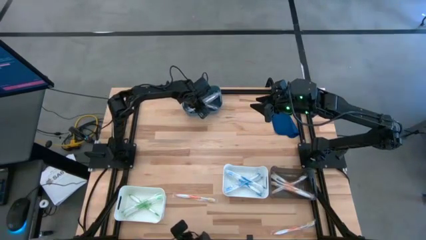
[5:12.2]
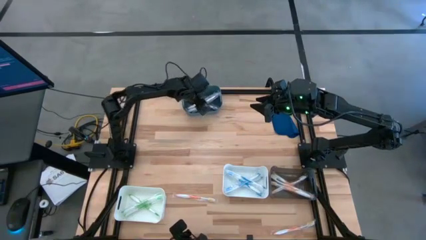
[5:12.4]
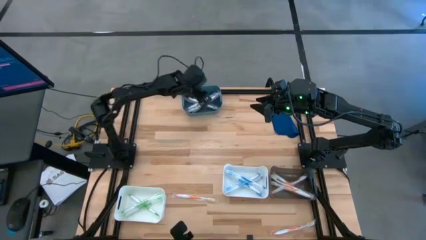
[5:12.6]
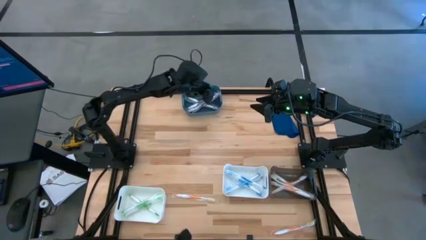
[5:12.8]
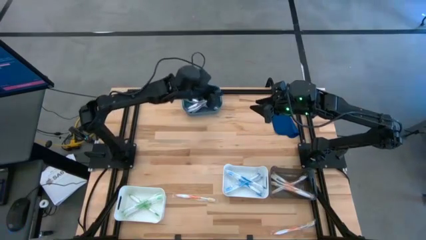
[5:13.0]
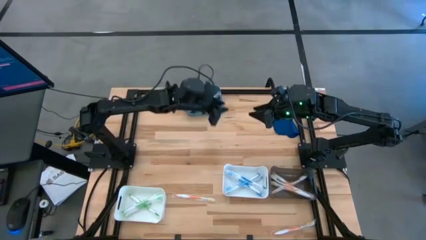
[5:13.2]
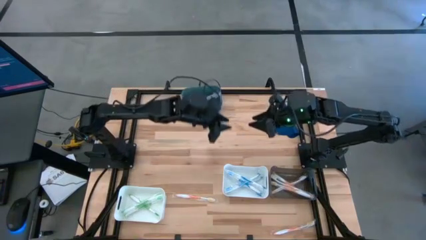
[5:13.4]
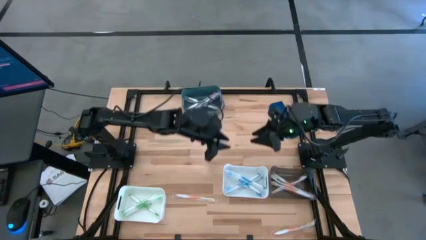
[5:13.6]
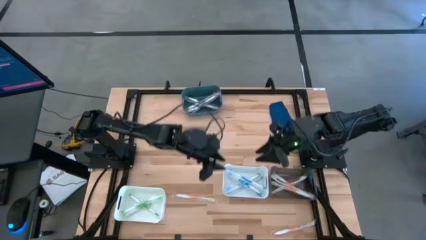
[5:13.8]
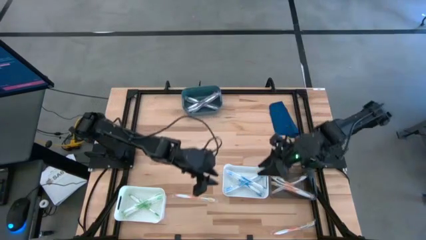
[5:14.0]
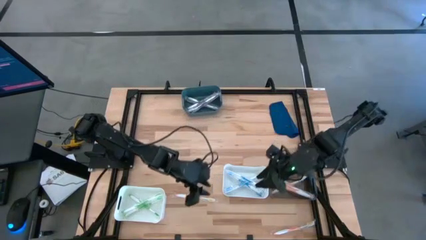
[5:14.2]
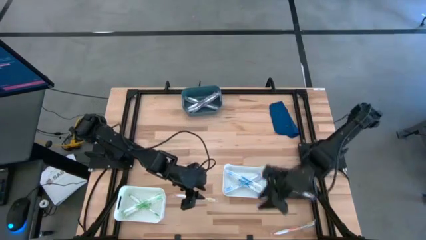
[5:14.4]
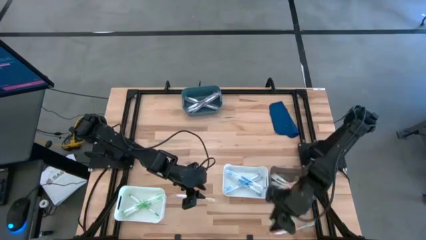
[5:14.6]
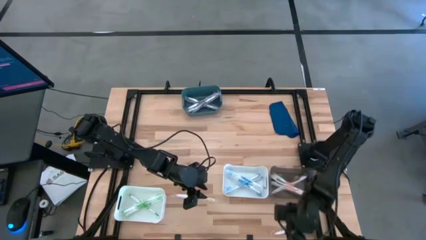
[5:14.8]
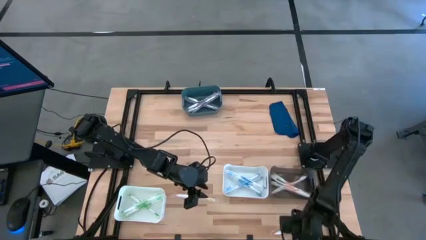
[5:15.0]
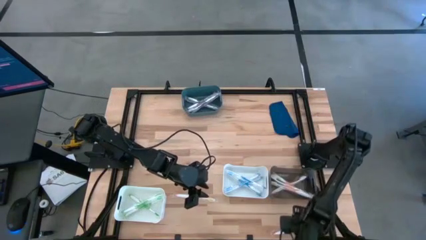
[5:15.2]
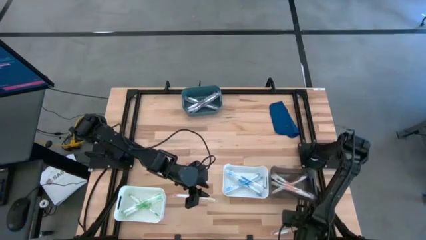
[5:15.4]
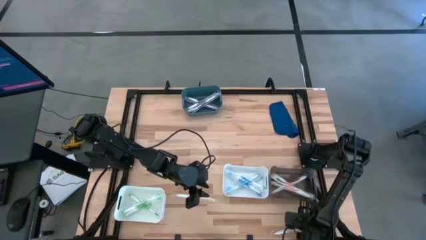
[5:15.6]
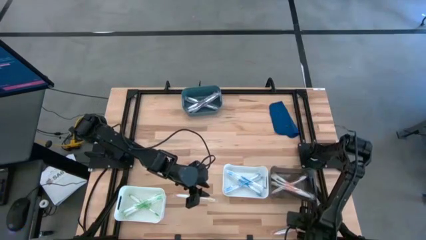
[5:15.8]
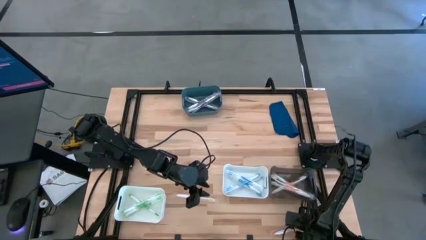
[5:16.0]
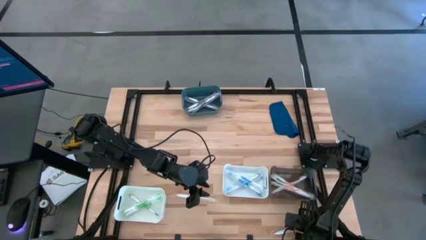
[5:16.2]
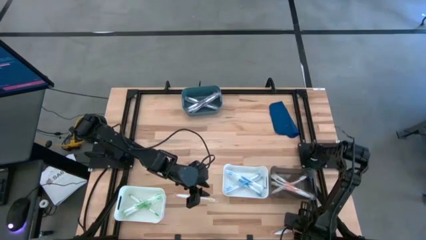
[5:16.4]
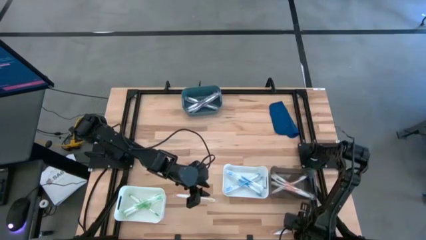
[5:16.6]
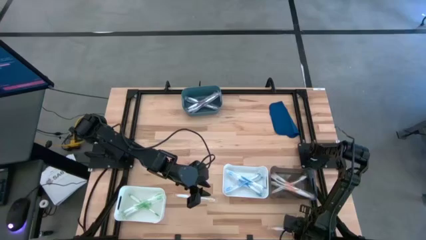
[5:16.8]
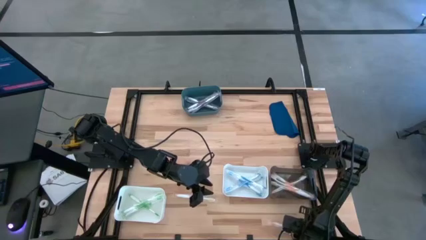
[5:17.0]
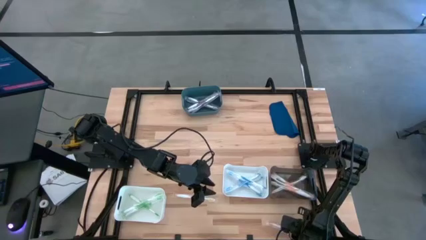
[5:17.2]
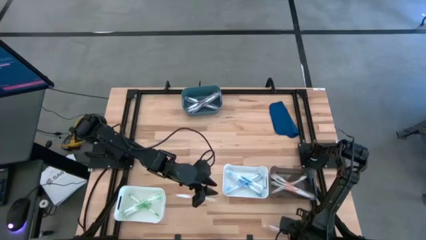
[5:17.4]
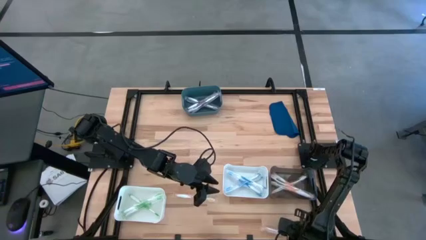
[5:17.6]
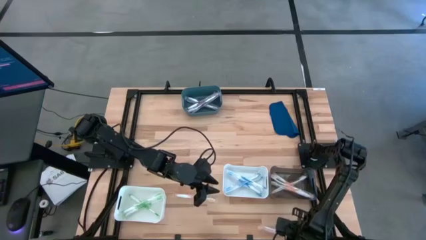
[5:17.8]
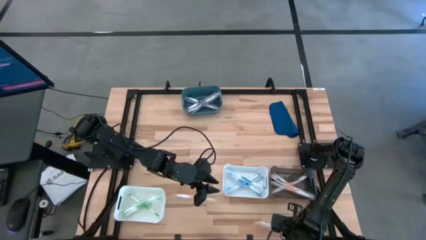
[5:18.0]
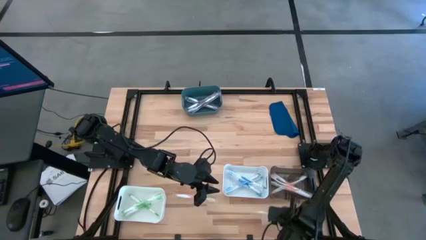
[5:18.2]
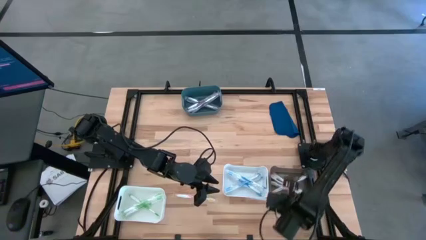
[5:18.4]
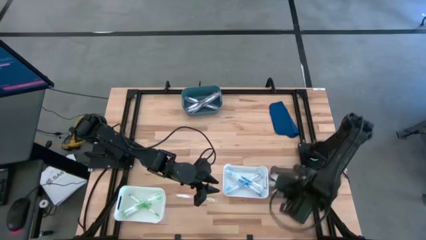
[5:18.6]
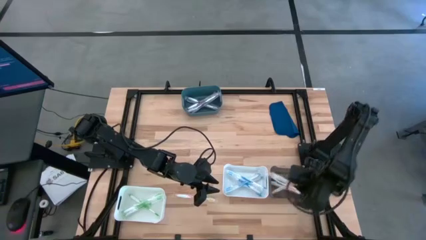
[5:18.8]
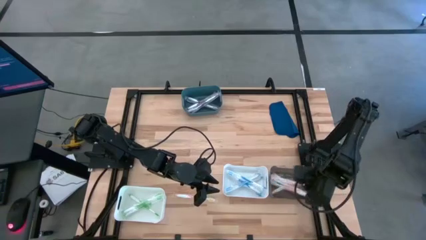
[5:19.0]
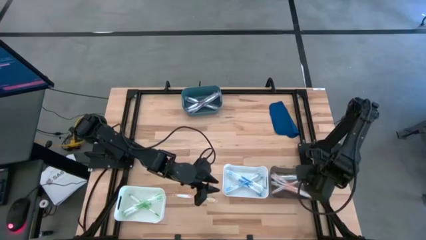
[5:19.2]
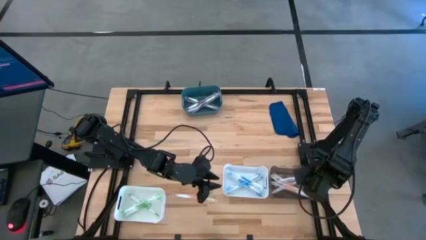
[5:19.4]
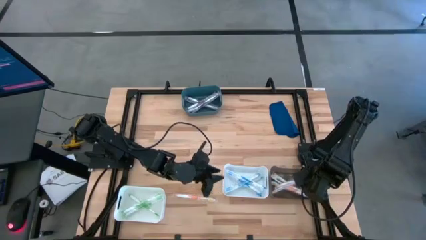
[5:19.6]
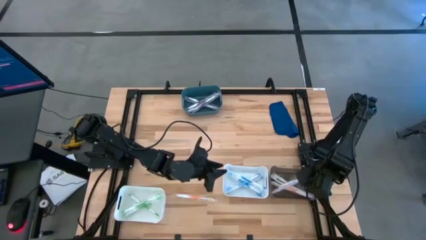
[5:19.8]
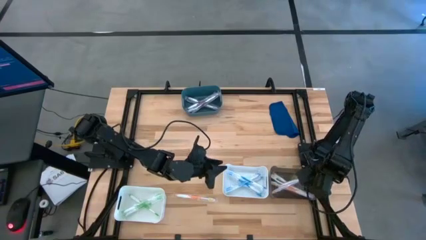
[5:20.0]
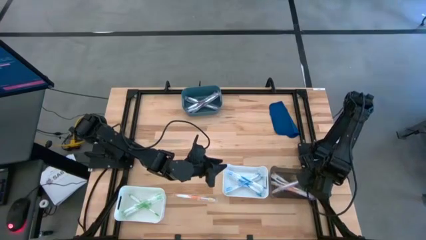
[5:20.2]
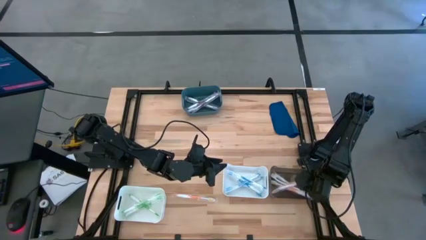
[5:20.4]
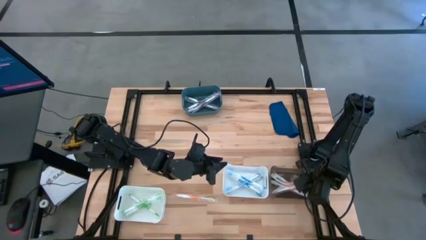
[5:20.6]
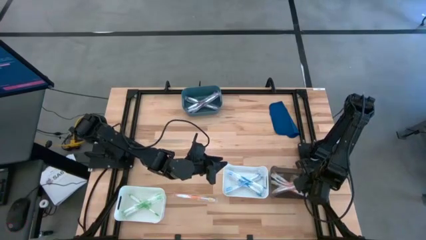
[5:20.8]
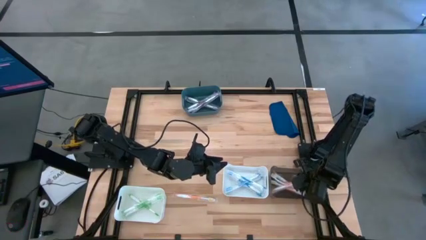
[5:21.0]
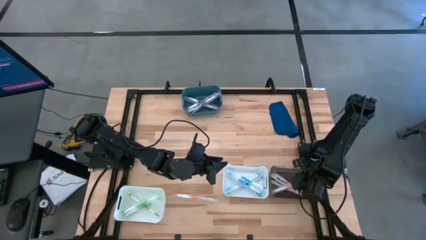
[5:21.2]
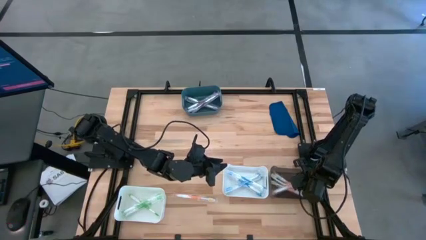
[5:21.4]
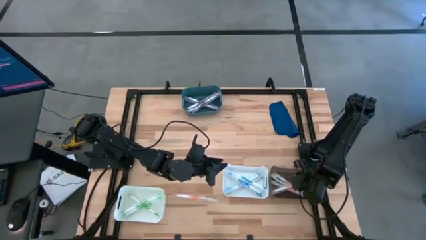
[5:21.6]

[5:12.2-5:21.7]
Task: Pick & Place Toothbrushes
Put the orange toothbrush into the black bin

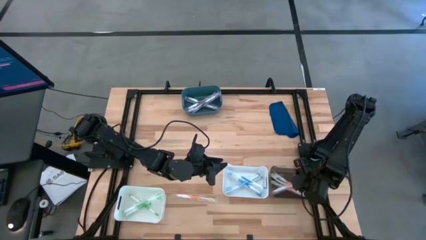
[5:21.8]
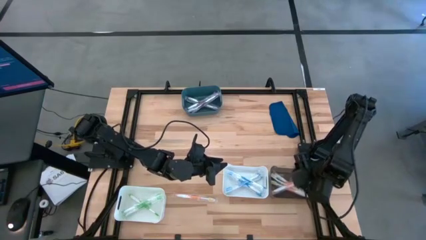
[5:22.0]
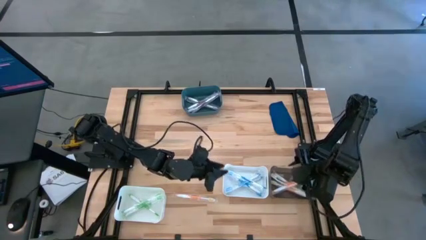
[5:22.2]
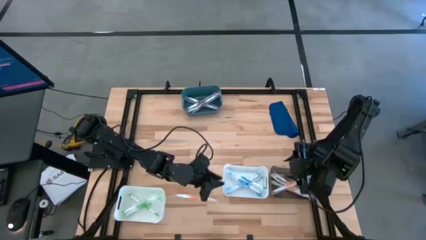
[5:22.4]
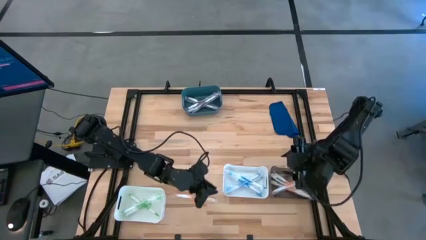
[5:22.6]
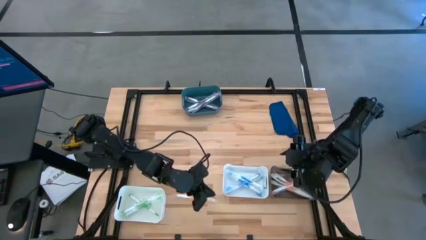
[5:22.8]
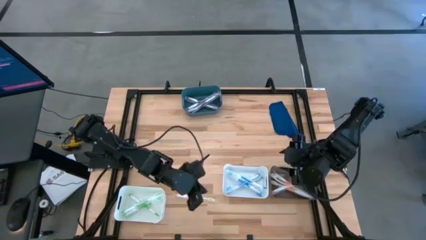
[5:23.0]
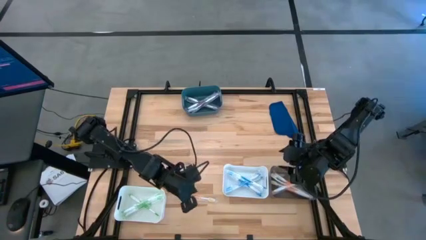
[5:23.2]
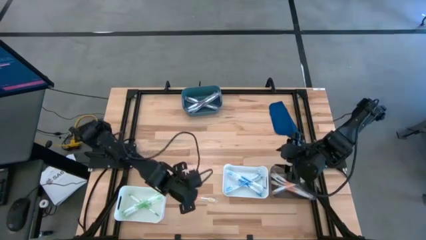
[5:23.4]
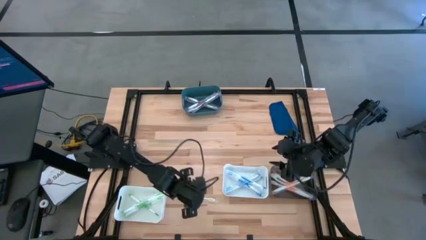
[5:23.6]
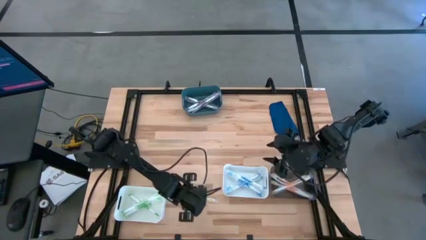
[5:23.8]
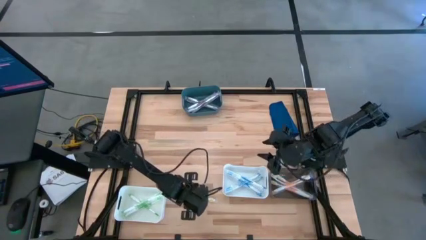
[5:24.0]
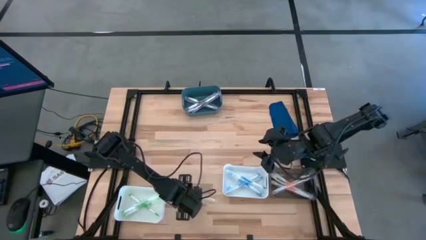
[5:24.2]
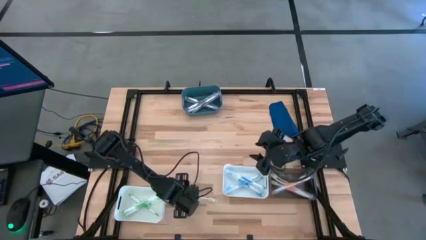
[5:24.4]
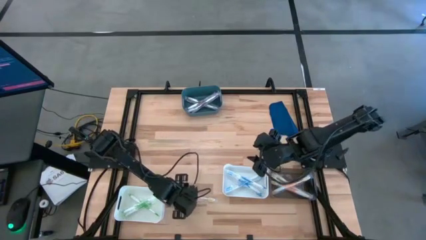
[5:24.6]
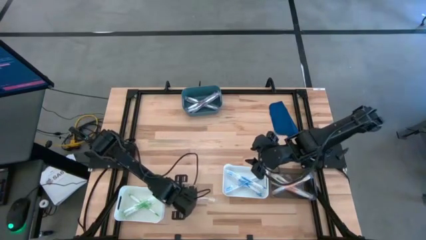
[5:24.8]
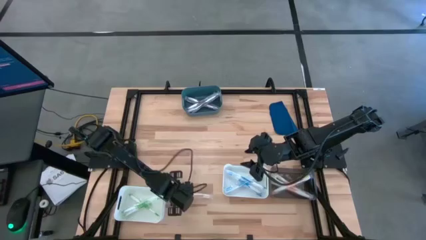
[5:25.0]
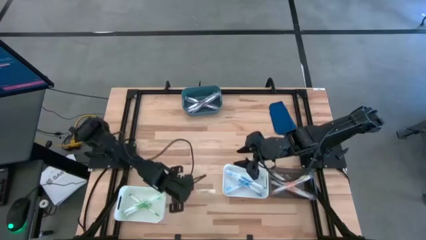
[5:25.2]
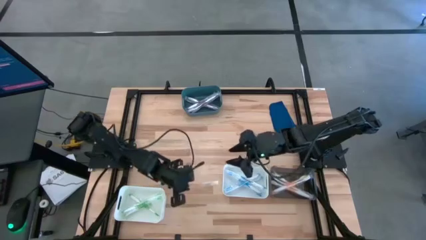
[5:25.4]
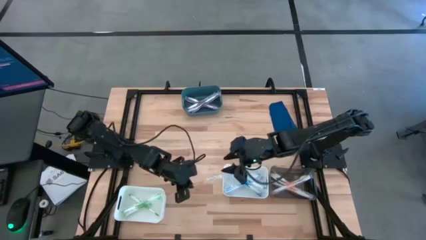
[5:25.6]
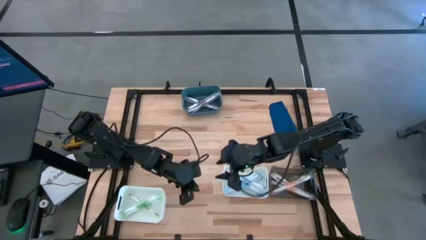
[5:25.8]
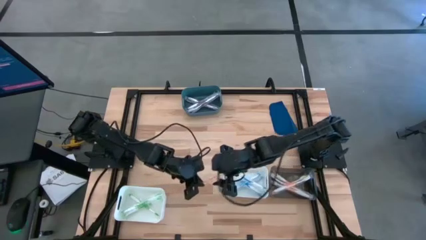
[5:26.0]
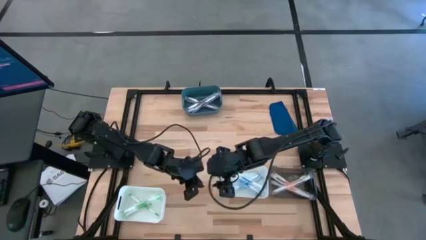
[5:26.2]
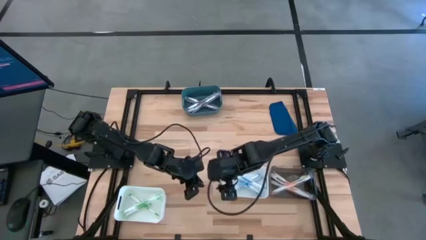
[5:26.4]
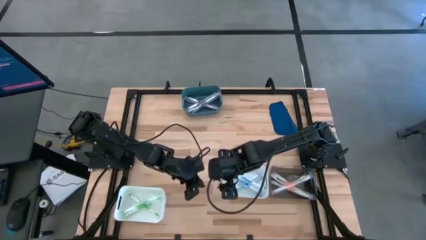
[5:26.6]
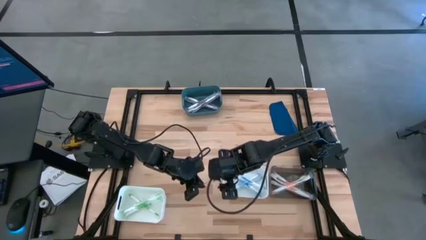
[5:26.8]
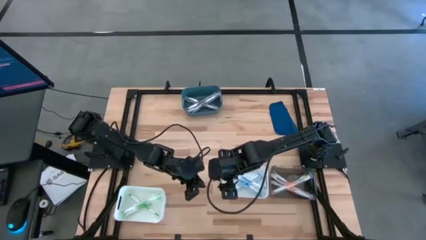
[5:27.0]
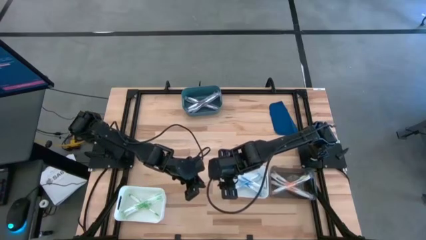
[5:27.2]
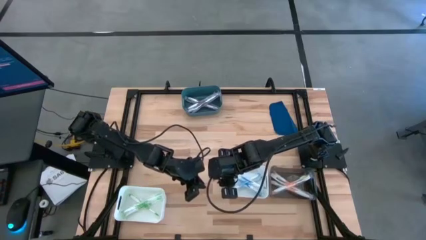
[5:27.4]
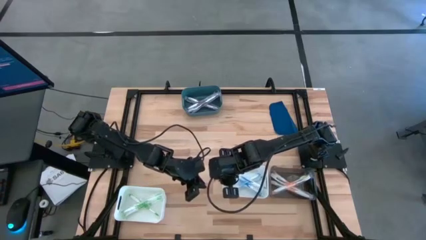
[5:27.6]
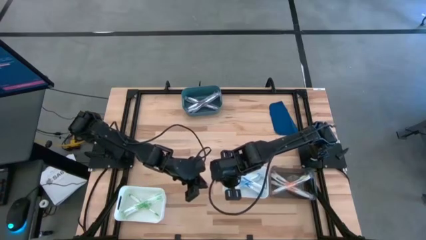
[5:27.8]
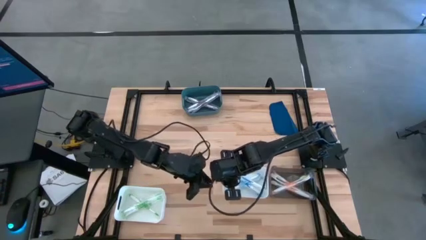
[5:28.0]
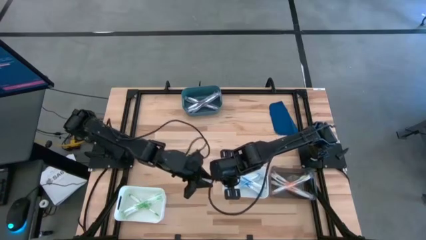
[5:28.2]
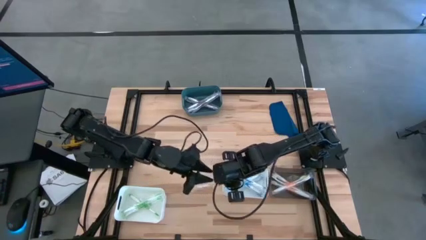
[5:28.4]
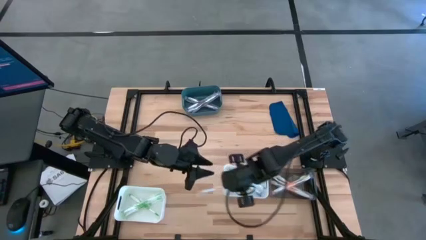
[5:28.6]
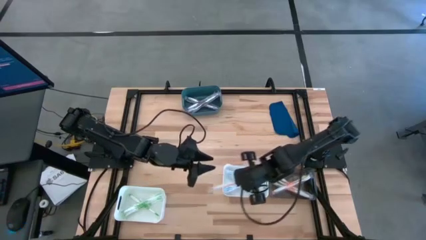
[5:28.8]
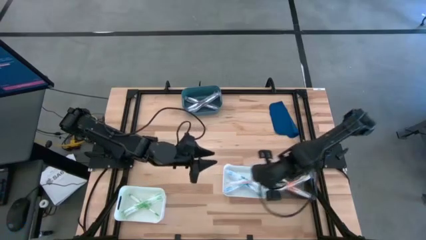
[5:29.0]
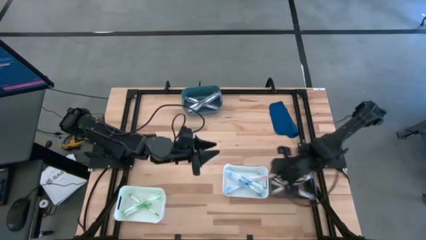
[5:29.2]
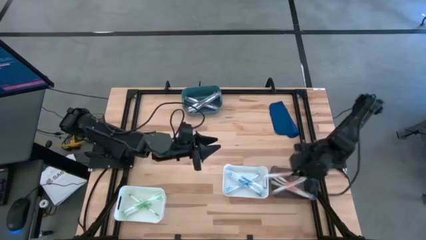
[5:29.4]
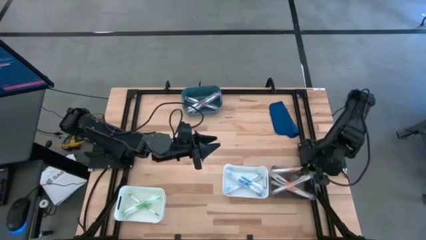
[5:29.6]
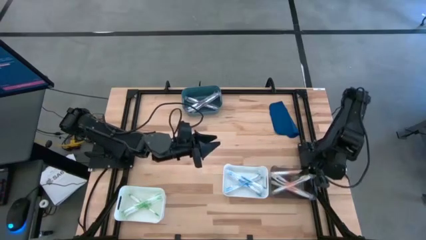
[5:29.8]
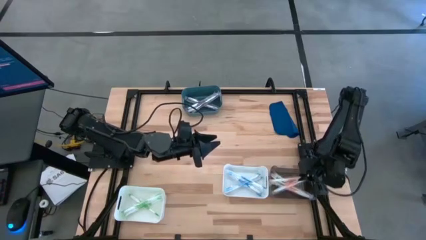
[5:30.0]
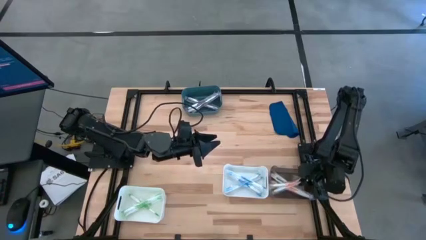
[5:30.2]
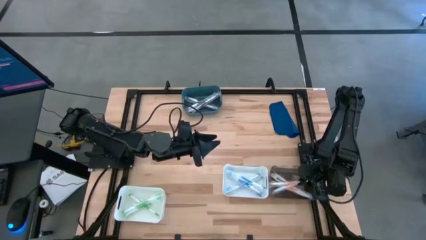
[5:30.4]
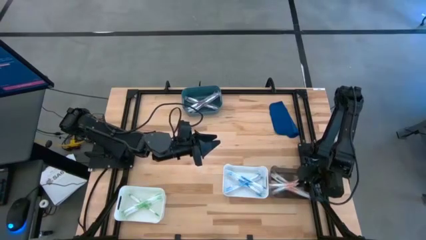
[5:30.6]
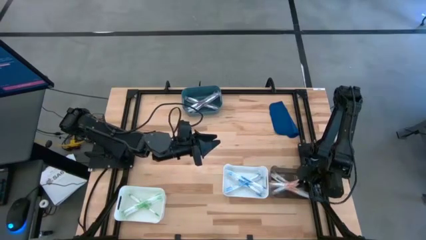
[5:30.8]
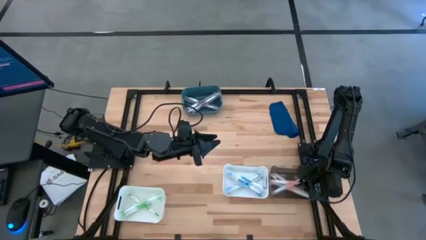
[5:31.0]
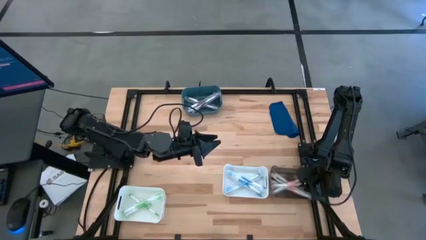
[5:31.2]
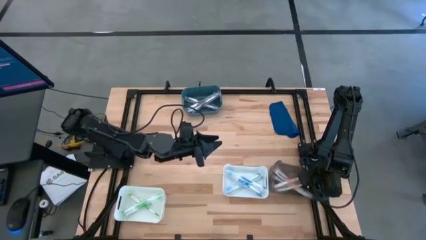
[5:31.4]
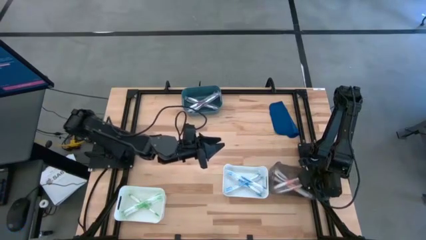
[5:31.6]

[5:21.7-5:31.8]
Put the orange toothbrush into the black bin
